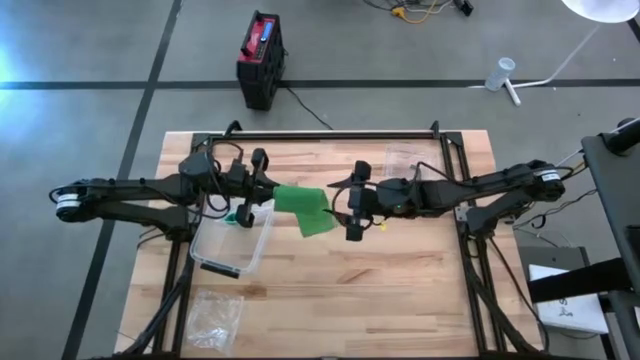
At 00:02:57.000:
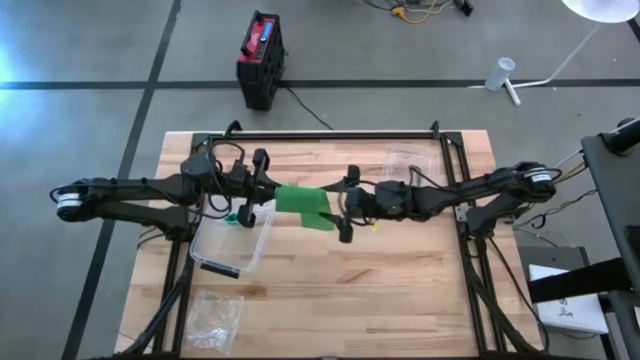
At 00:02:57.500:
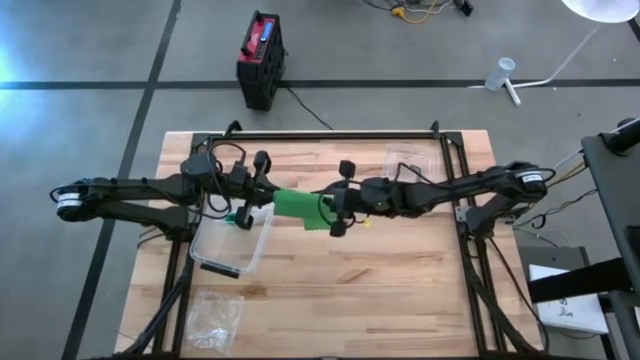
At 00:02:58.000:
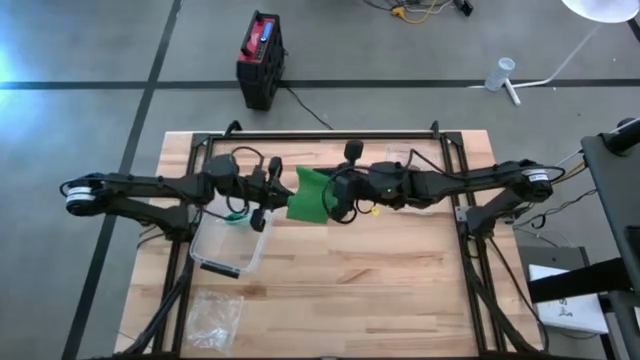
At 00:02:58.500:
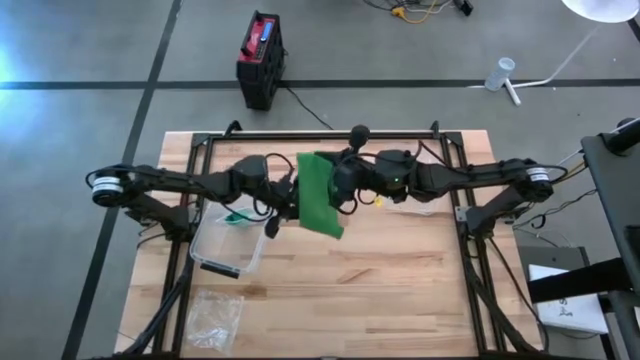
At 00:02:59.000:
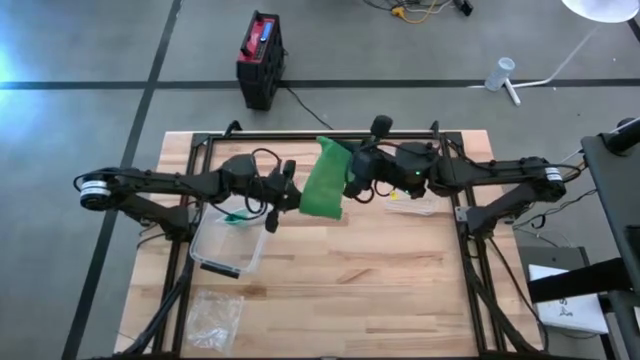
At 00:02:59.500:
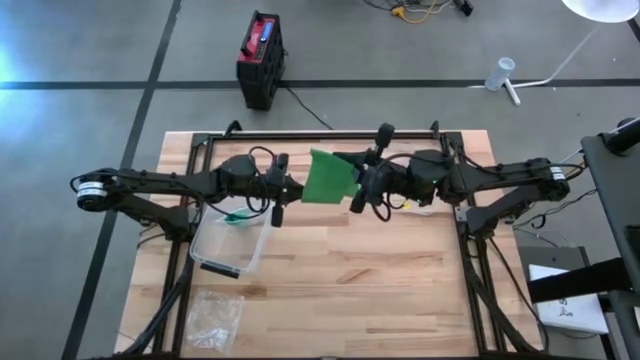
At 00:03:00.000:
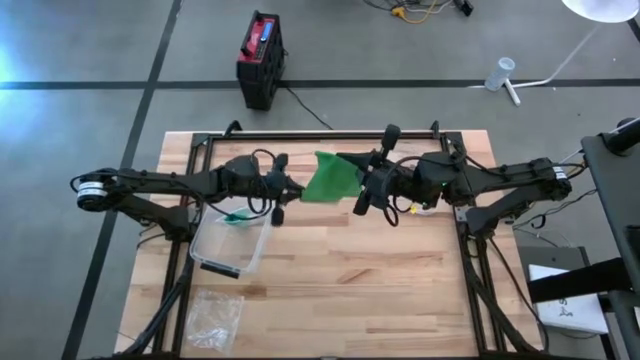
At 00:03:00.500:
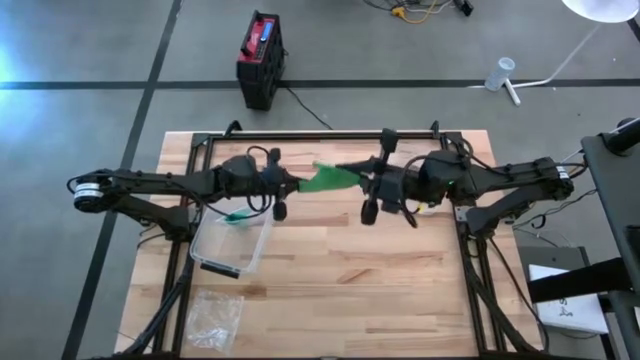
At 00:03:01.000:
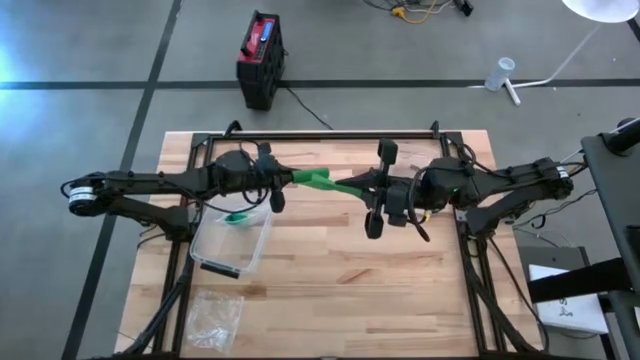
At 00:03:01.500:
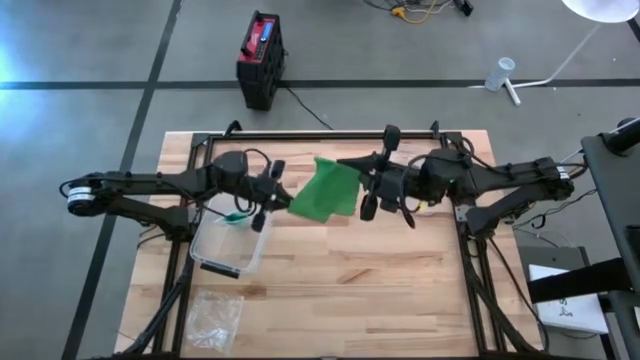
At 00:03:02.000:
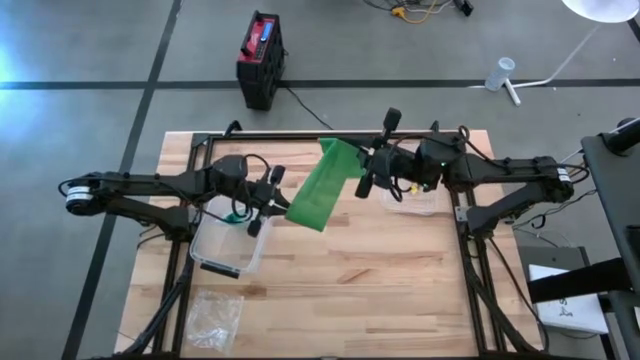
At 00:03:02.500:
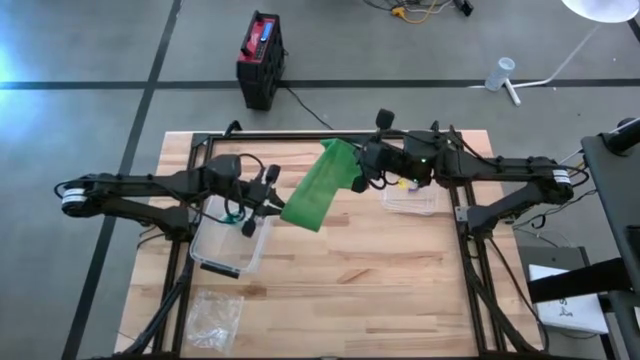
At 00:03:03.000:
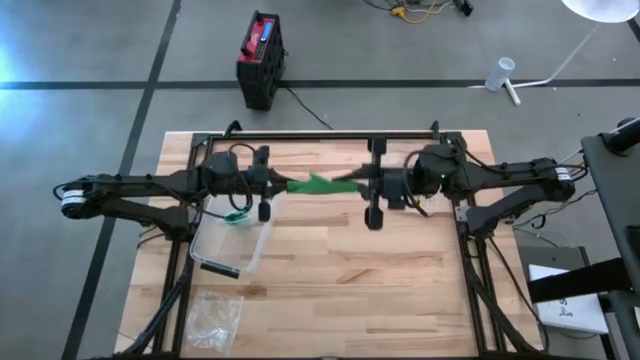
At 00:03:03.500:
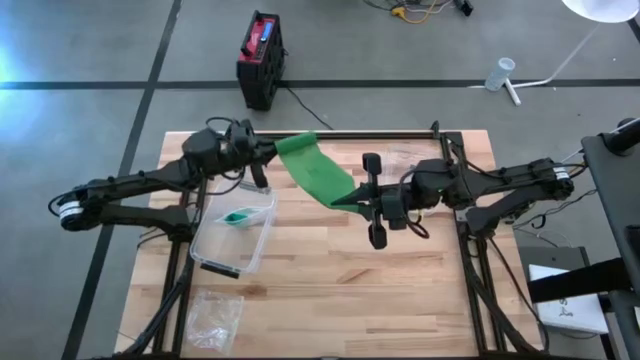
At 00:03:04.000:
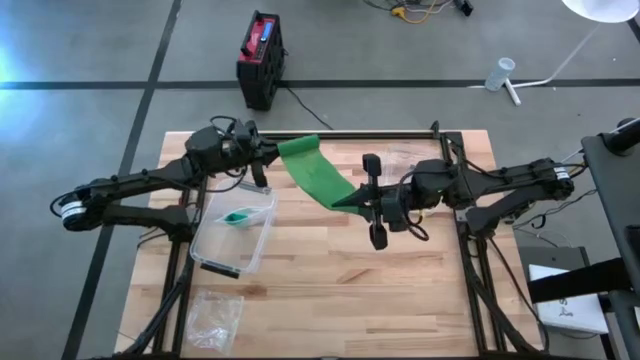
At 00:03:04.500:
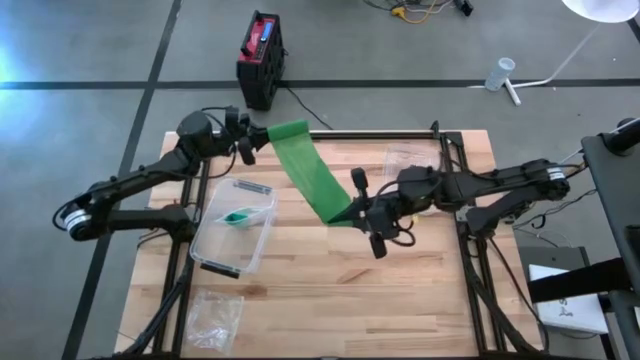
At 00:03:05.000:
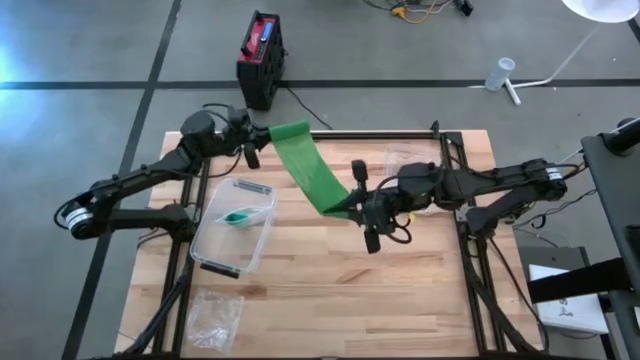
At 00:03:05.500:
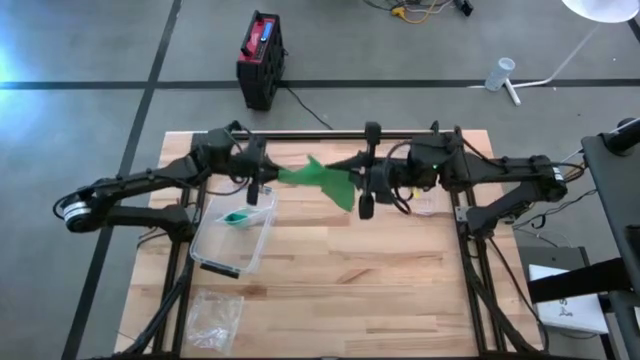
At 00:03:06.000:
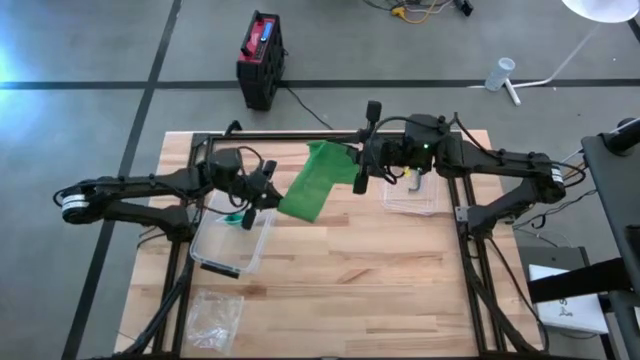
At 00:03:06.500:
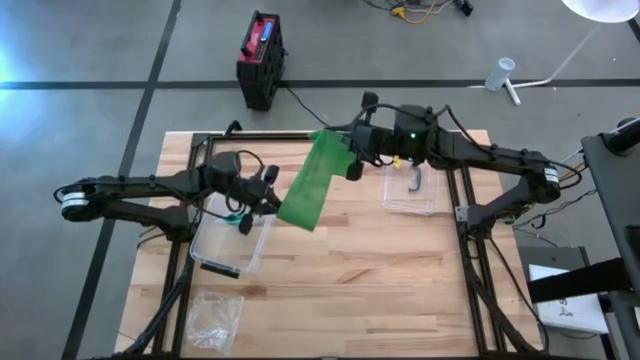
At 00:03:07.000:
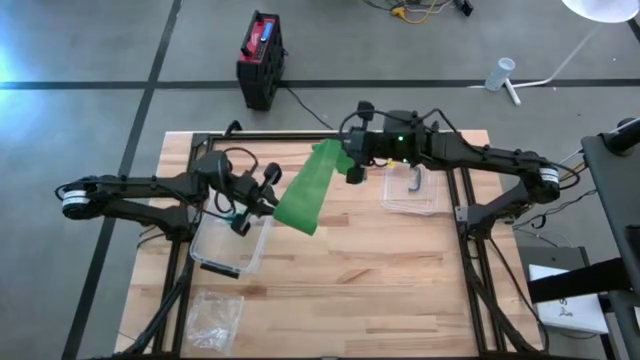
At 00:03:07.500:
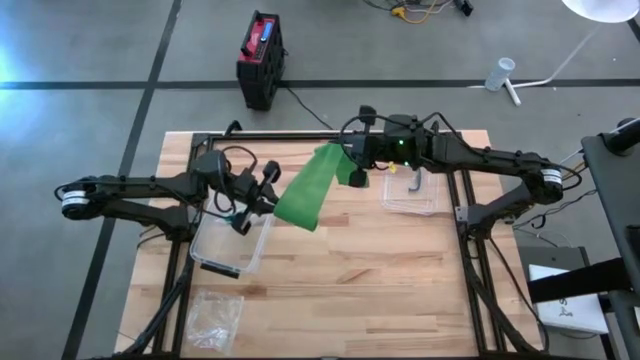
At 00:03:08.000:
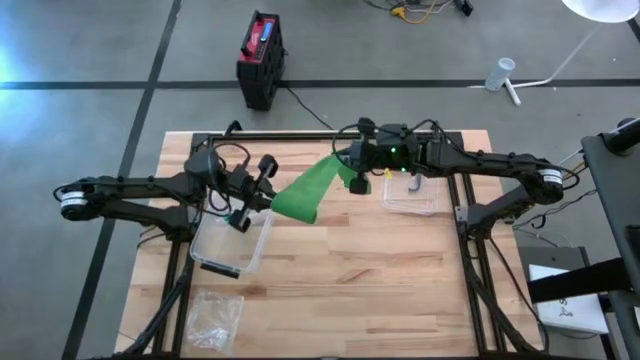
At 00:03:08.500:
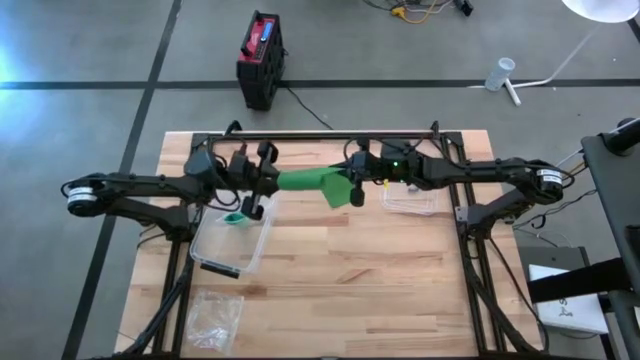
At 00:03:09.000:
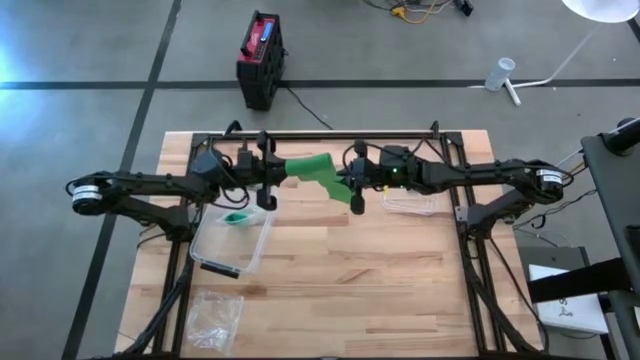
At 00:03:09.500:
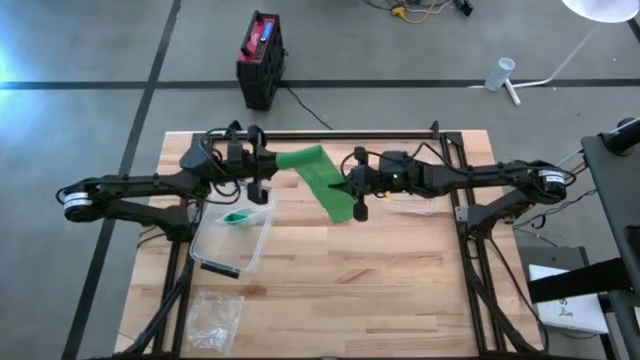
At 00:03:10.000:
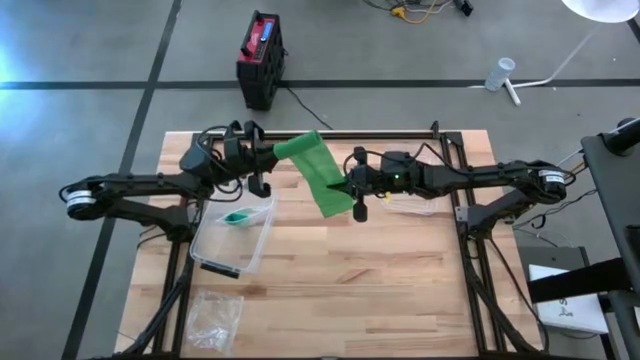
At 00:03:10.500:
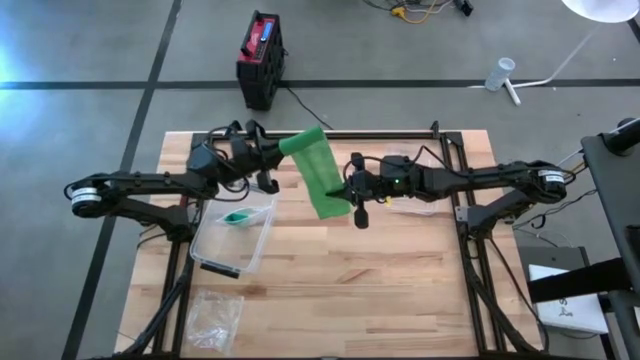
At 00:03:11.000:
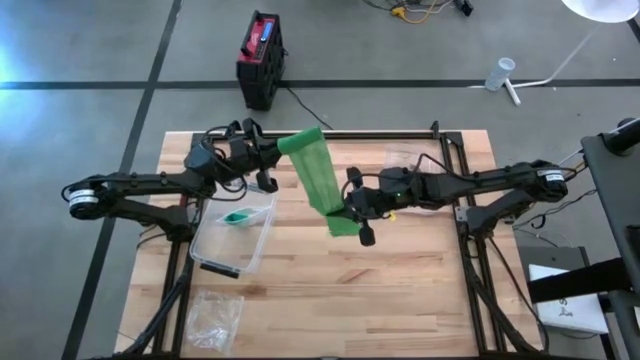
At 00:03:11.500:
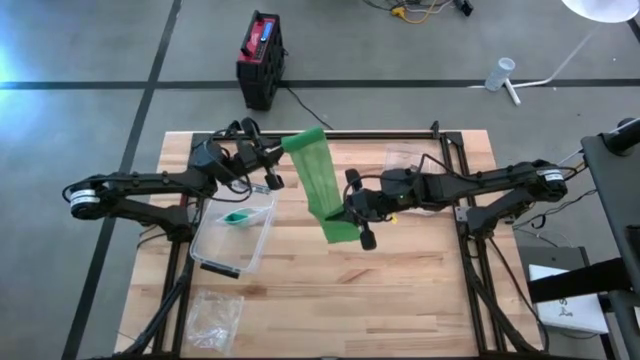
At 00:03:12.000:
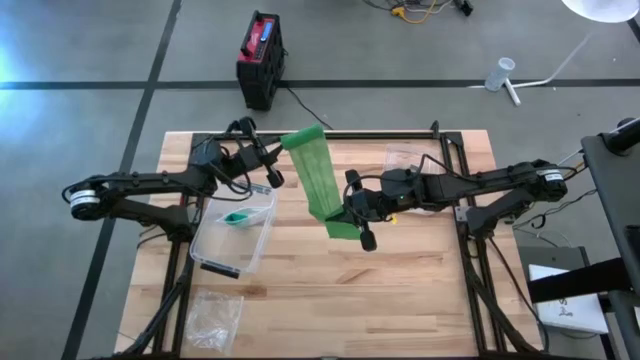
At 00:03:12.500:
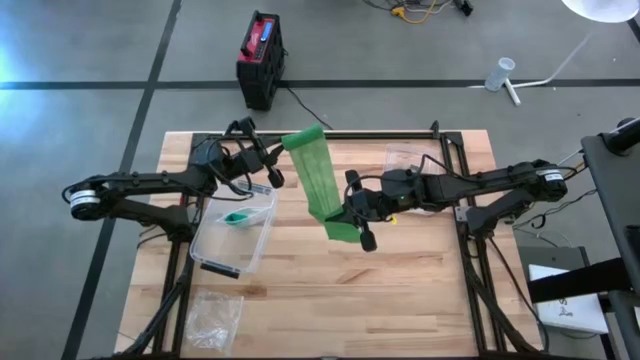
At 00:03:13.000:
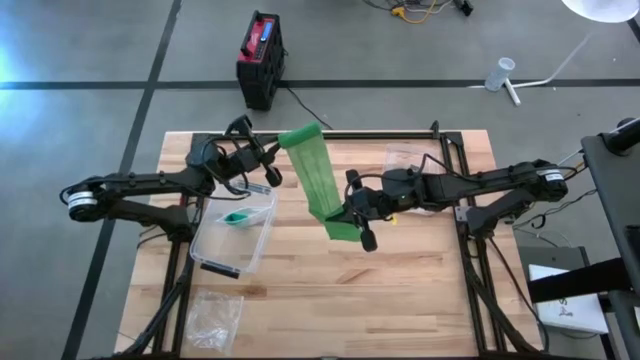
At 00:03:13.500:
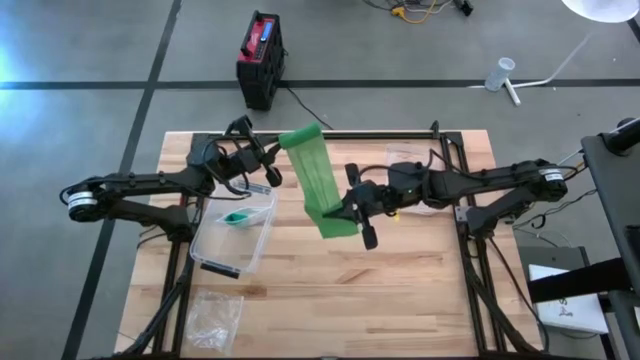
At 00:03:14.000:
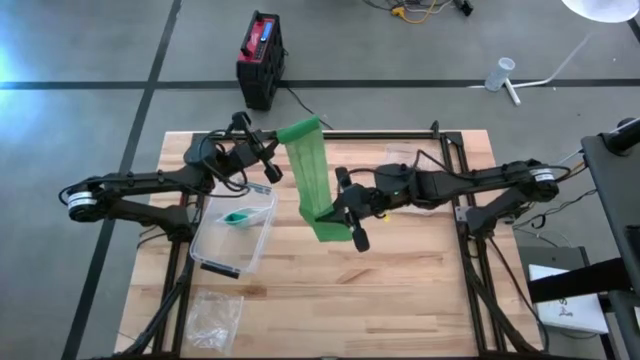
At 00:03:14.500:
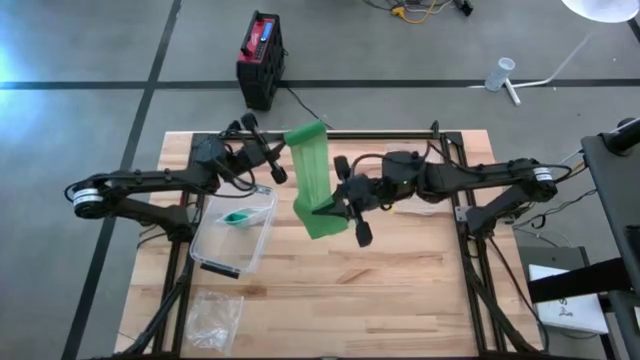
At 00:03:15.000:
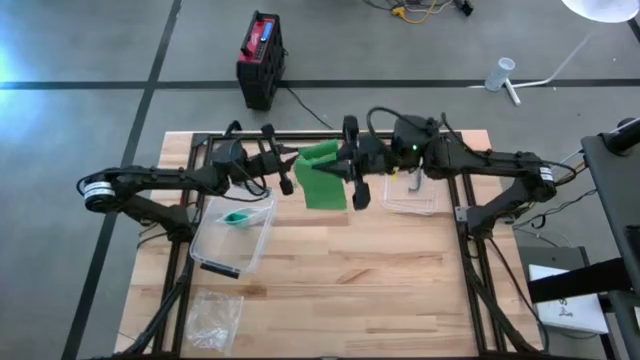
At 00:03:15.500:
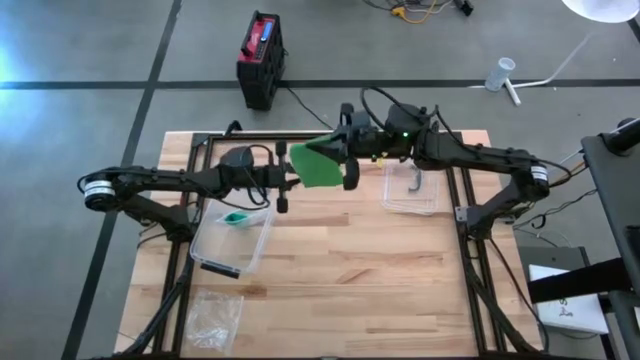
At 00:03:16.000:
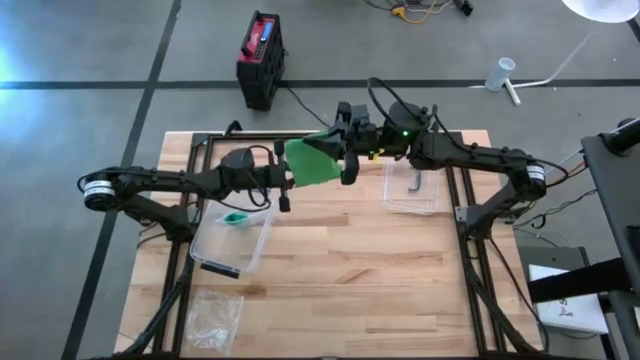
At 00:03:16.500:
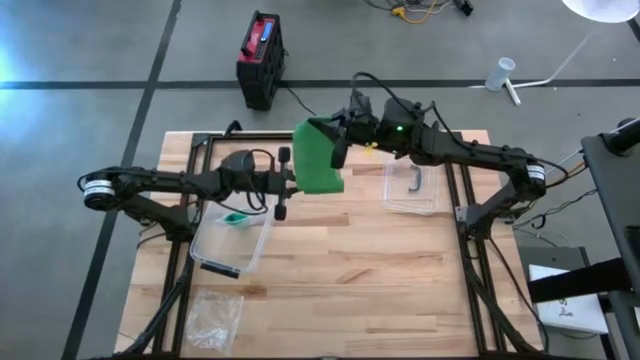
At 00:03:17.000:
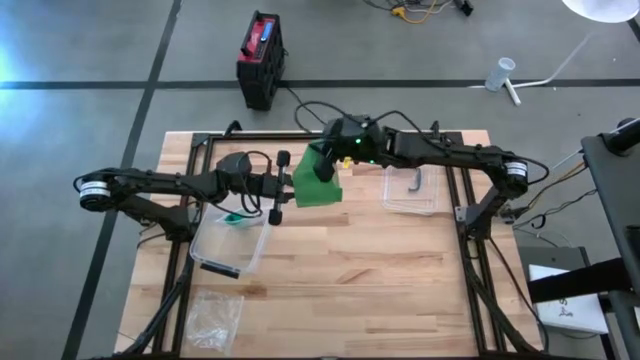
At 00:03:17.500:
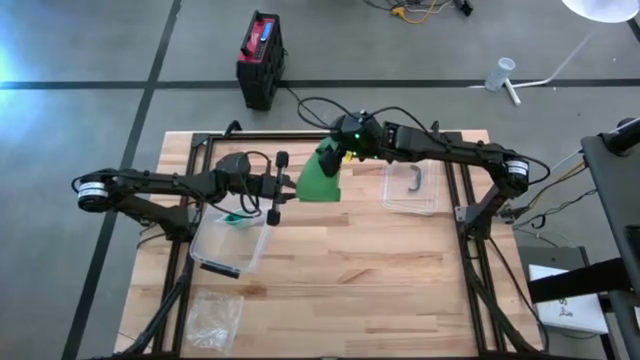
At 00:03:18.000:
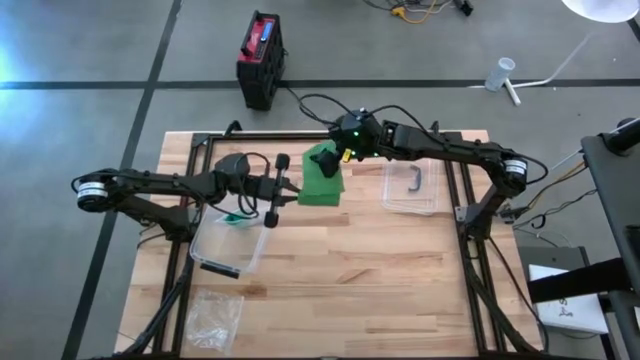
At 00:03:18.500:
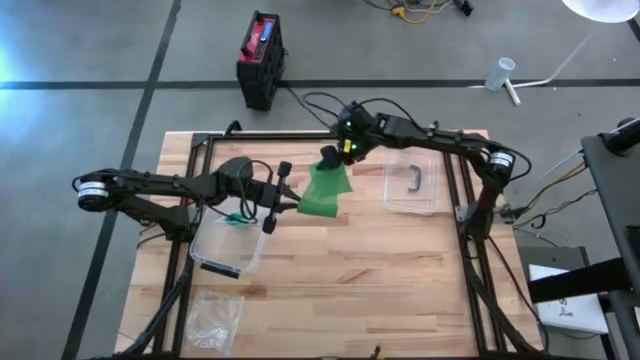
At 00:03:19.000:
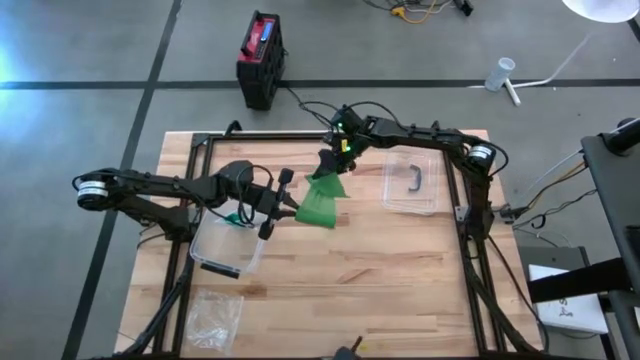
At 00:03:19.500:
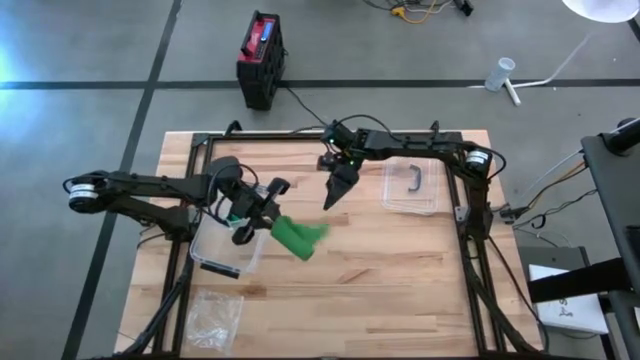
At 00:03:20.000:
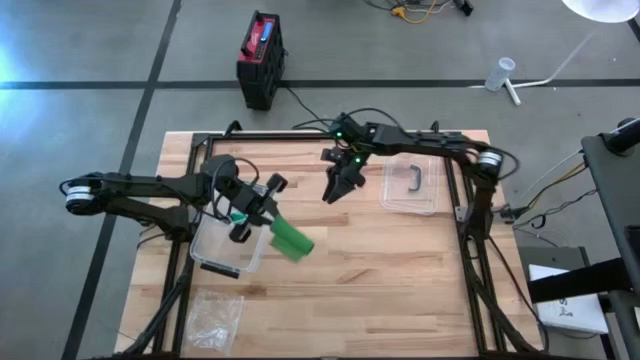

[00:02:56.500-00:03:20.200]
Task: Roll bandage
Roll the dark green bandage
